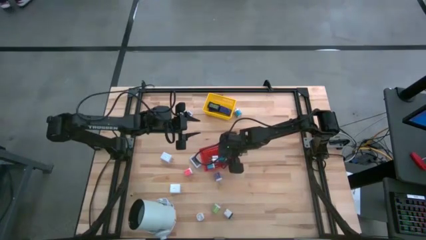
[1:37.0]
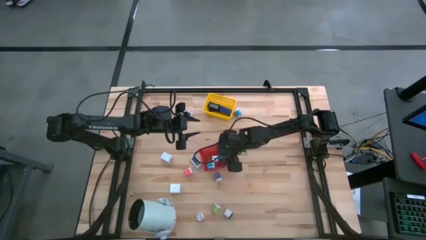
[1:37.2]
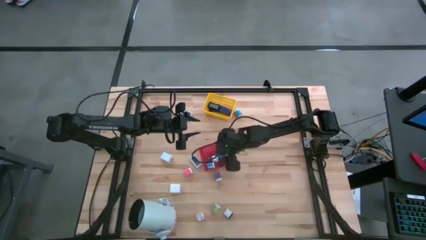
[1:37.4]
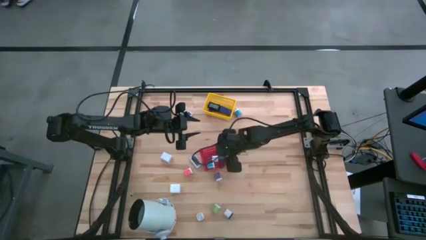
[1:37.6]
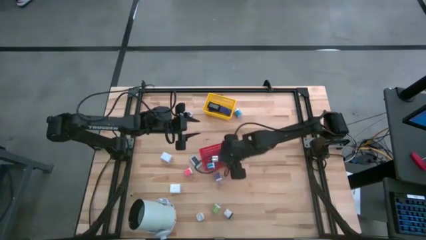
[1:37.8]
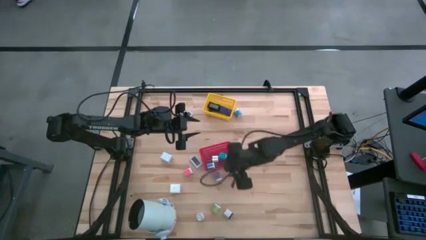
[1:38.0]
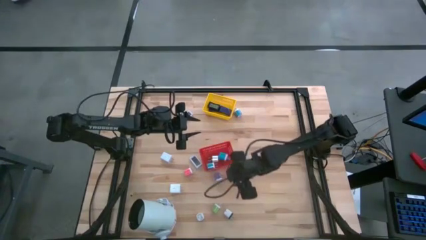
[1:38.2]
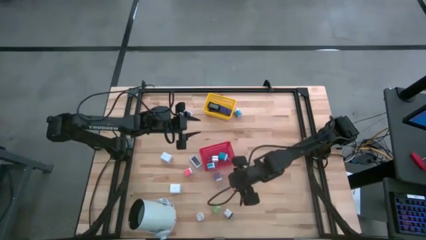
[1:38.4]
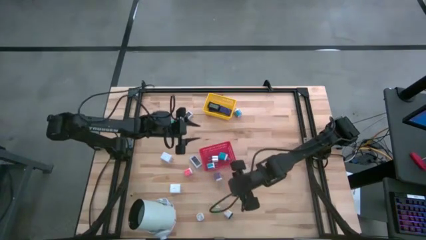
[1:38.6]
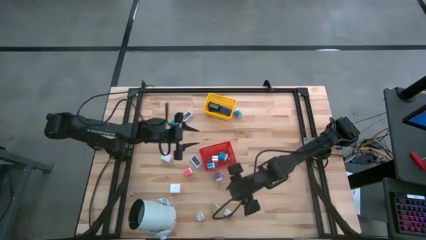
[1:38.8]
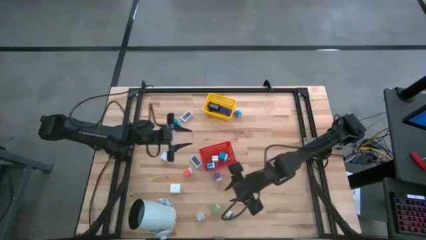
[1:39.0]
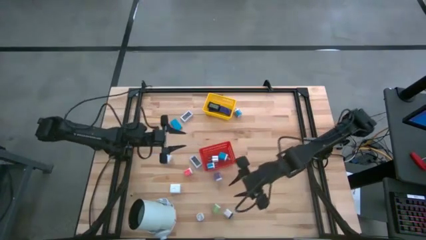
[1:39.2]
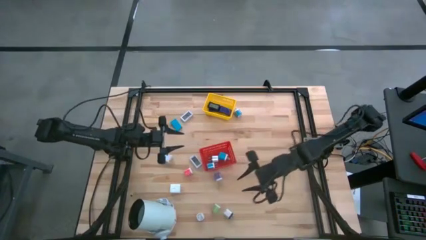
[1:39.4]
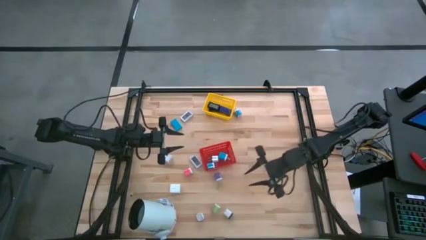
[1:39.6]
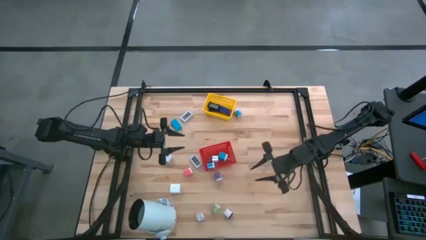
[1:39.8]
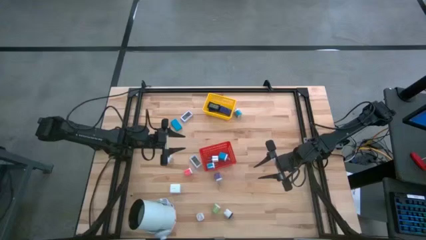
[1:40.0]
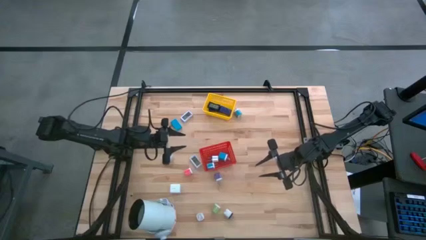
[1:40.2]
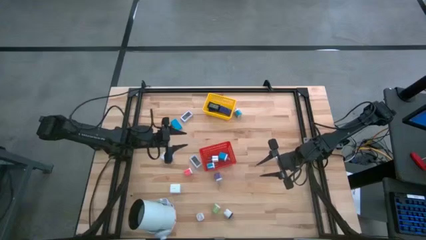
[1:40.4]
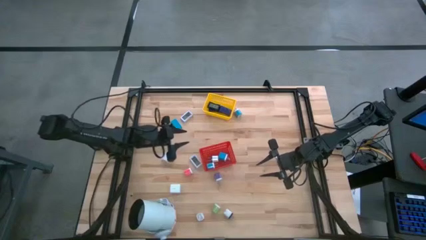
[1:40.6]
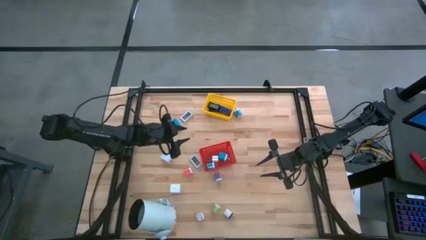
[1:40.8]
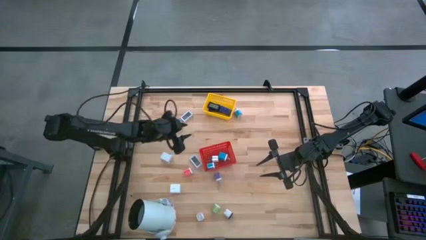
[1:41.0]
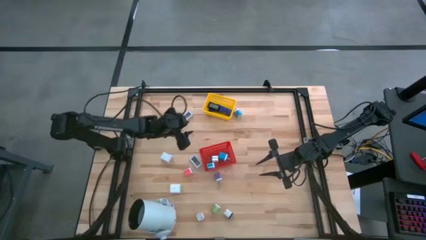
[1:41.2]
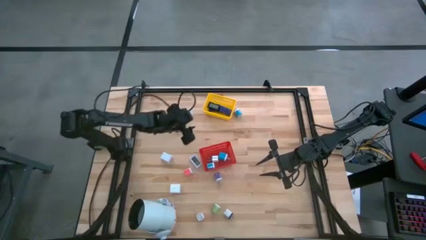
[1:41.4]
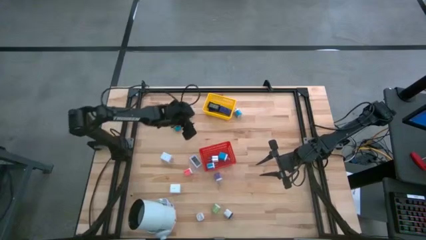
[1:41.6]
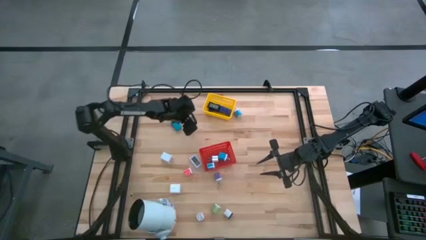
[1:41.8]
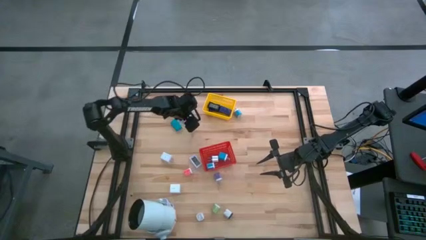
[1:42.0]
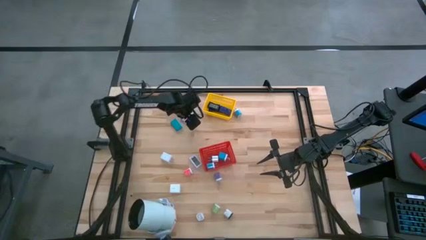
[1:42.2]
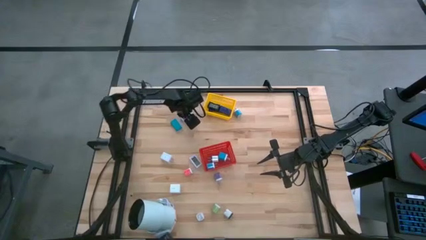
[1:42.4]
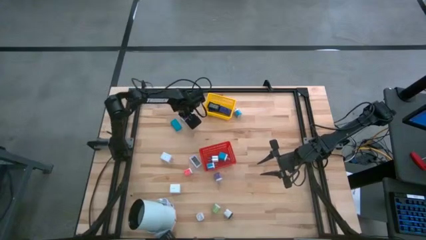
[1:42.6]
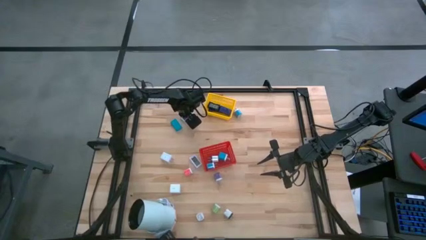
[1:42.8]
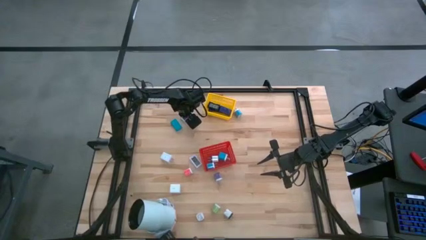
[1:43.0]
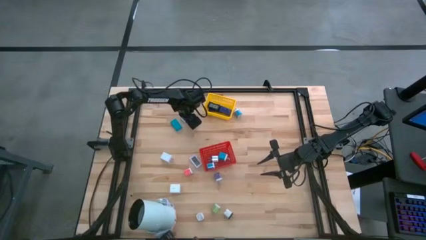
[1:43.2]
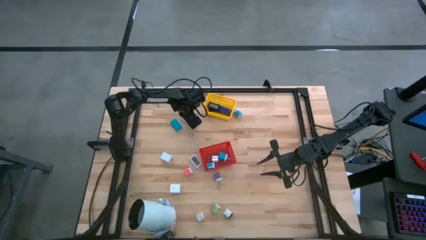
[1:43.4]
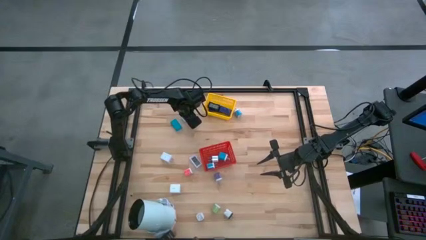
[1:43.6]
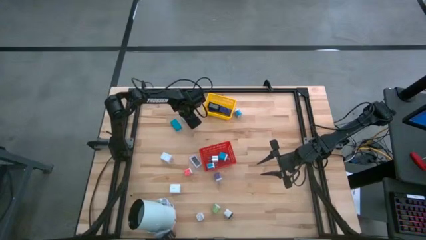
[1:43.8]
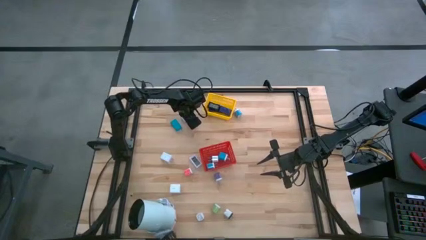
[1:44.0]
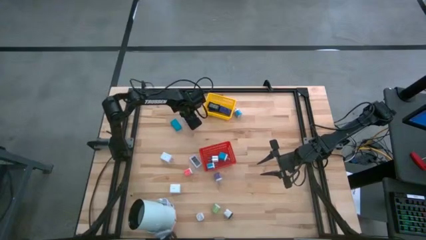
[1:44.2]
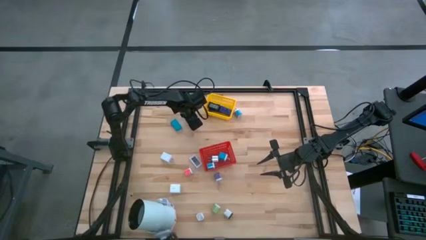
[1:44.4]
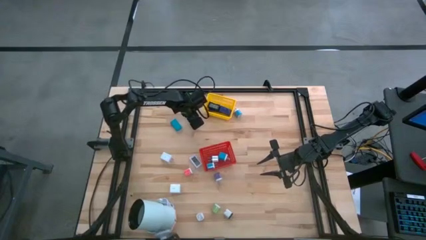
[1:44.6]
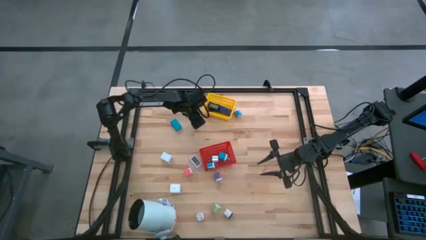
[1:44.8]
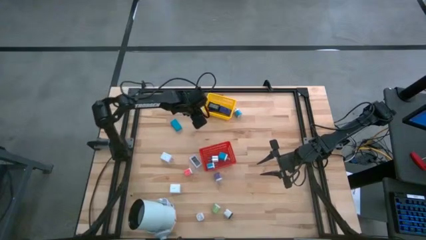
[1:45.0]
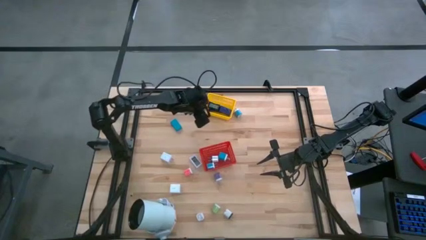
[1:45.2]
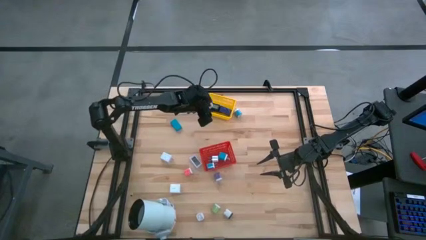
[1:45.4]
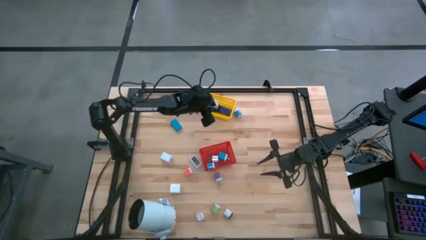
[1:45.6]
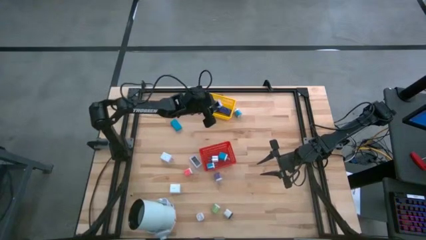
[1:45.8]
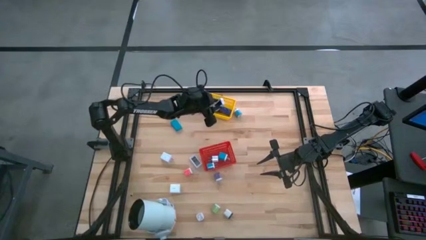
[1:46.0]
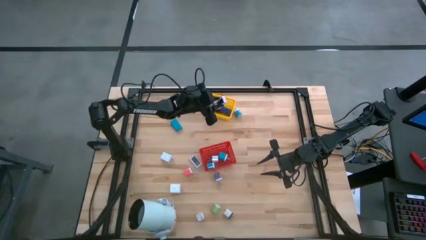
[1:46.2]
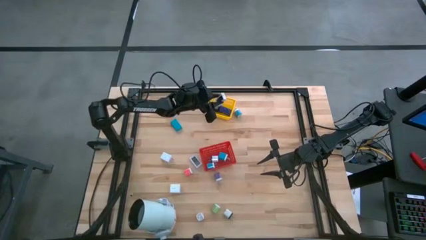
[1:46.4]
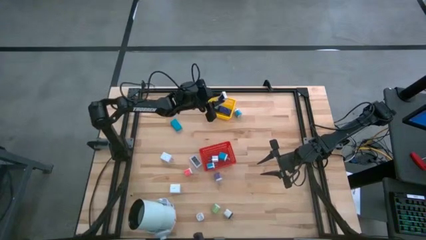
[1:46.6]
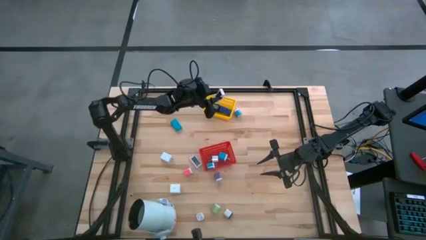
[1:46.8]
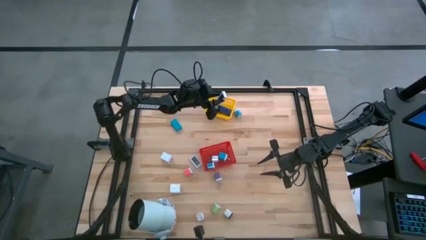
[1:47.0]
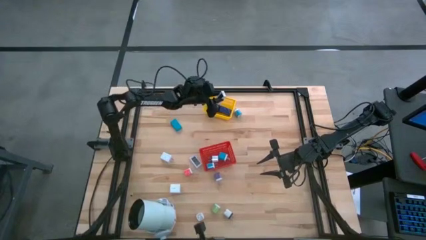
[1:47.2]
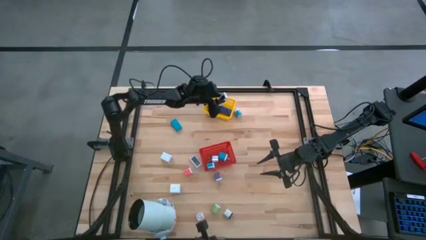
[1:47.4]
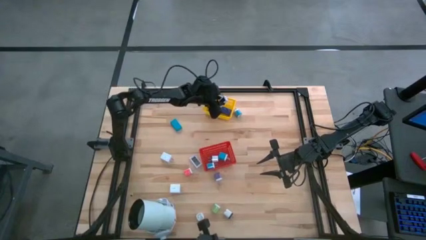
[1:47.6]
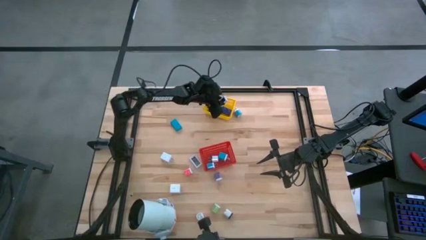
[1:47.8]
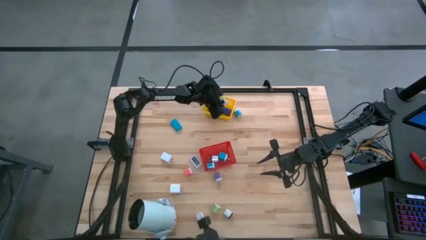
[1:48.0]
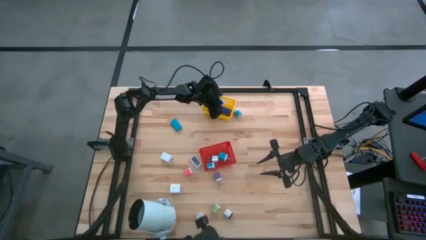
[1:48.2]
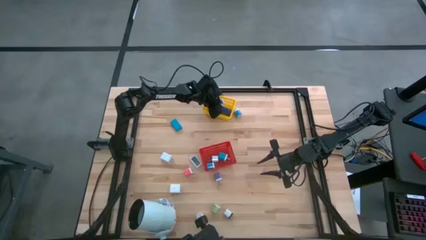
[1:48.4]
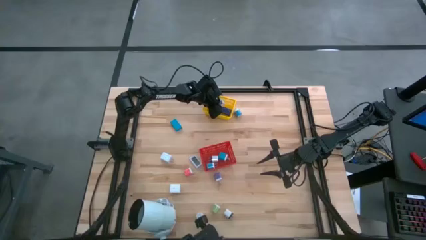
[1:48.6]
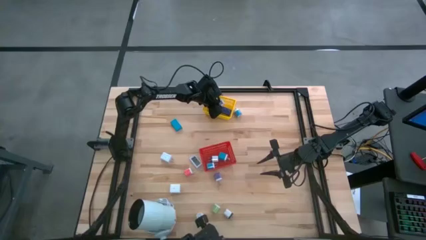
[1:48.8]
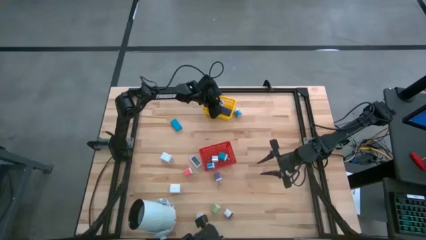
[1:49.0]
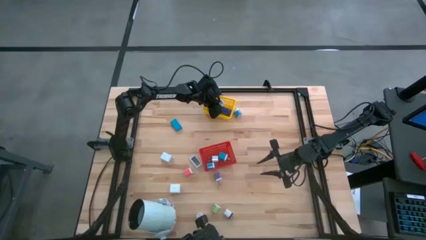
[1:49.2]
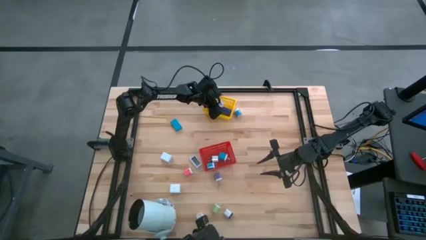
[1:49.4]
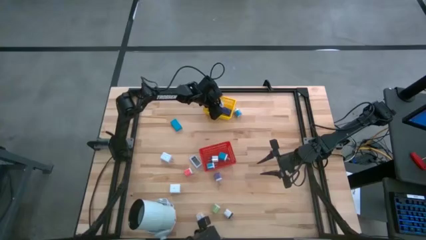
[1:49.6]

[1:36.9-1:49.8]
Task: Pick & Place Office items
Put the top white digital clock into the yellow bin

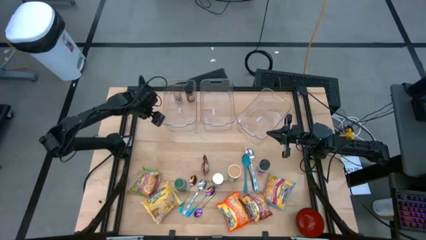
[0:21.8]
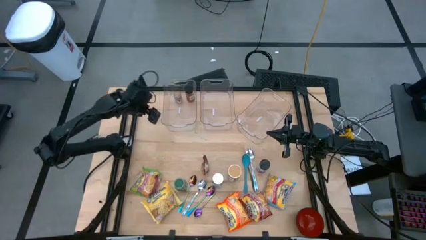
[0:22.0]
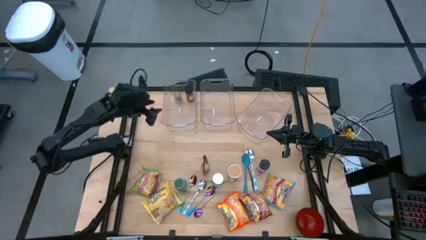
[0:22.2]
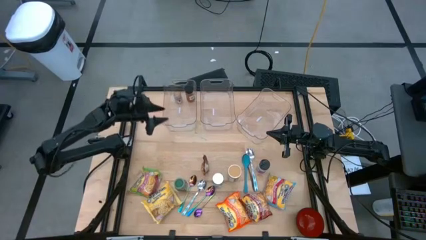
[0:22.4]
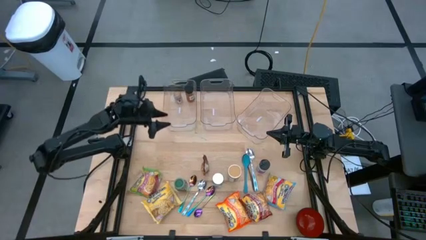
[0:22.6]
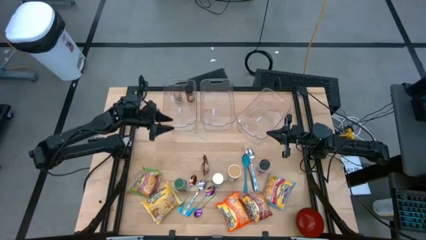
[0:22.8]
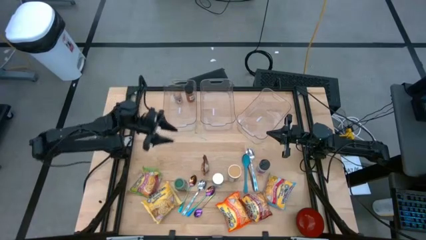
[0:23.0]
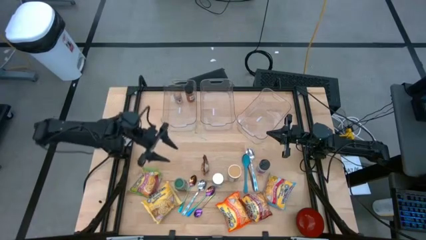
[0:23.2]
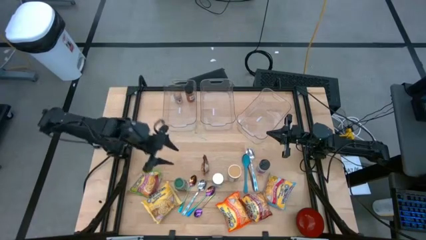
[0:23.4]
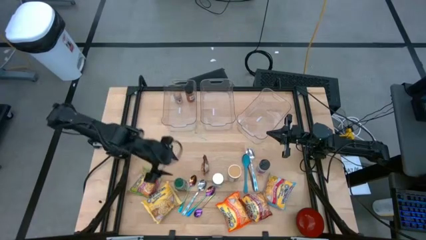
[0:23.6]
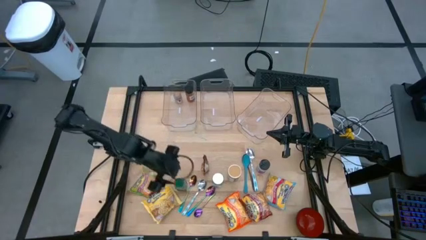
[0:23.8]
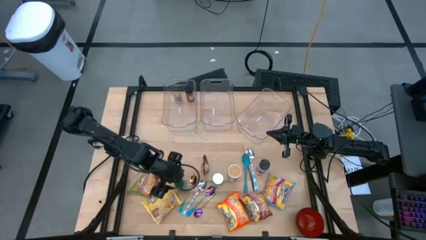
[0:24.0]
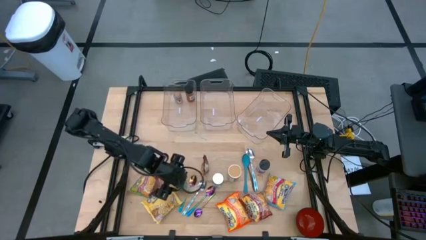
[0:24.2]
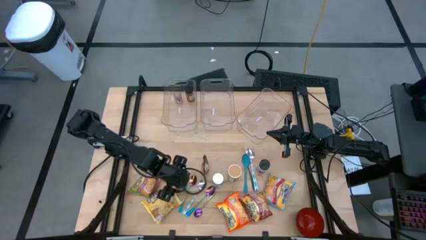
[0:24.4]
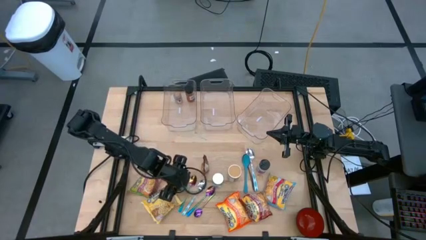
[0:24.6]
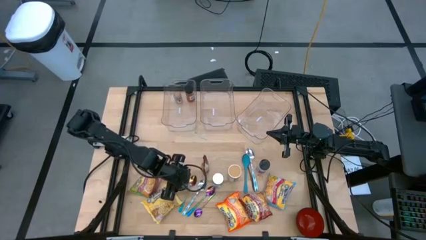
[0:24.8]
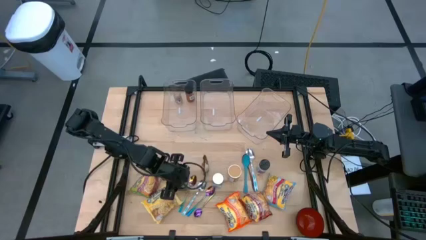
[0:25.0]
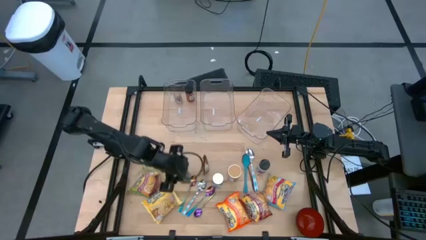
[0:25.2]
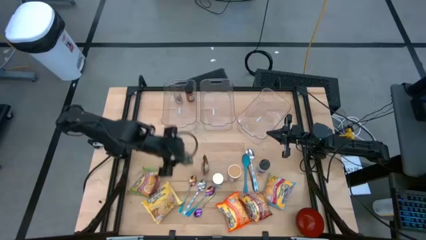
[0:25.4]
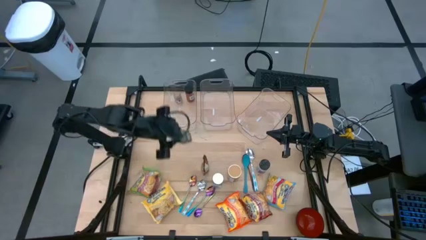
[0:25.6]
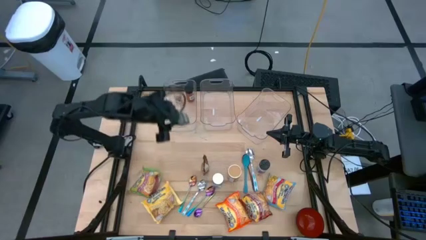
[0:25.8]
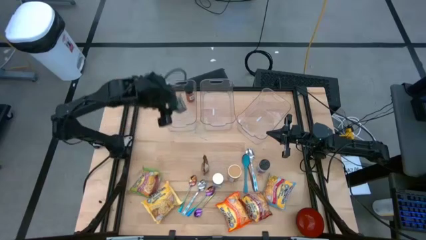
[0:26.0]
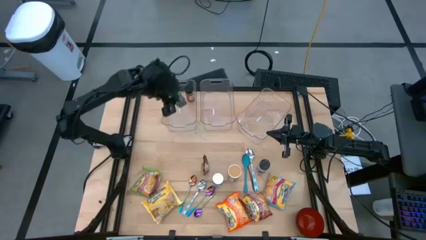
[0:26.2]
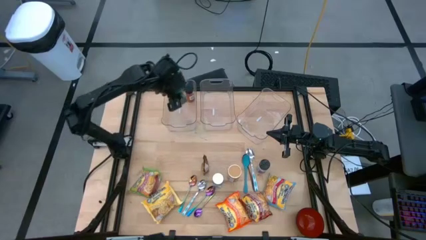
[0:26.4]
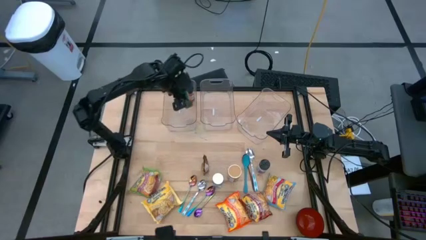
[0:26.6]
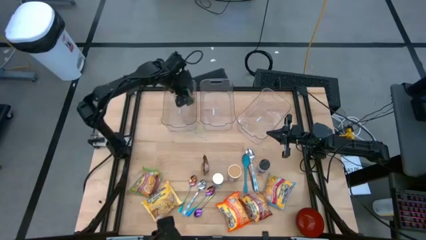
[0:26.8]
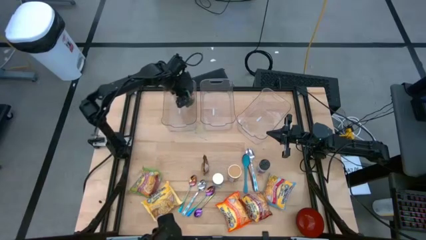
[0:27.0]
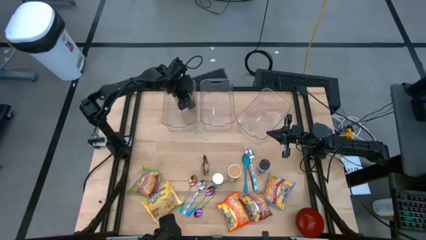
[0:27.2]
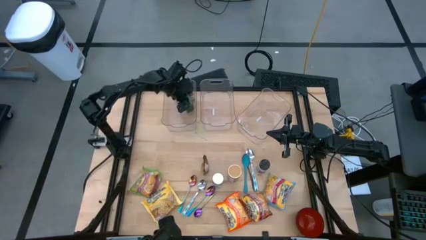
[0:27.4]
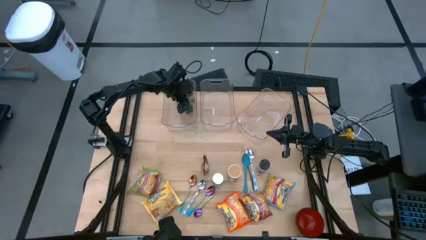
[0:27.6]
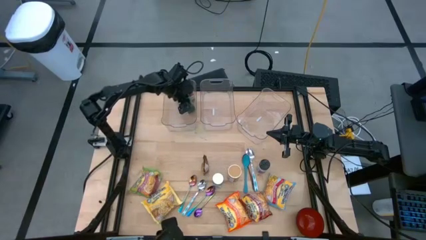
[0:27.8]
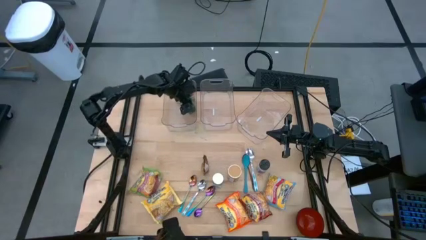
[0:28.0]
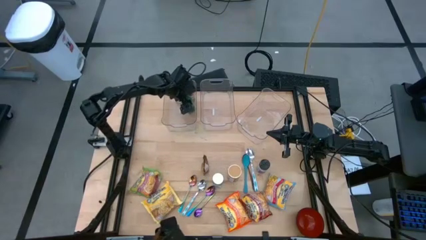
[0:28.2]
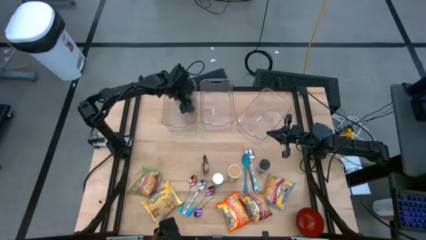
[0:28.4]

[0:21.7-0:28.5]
Task: Pick & Place Food Item
Put the green seasoning bottle into the left transparent bin
